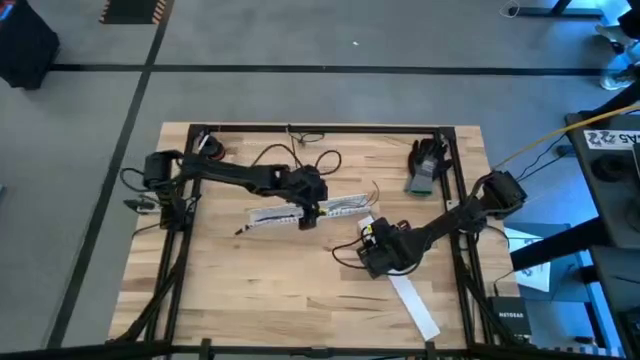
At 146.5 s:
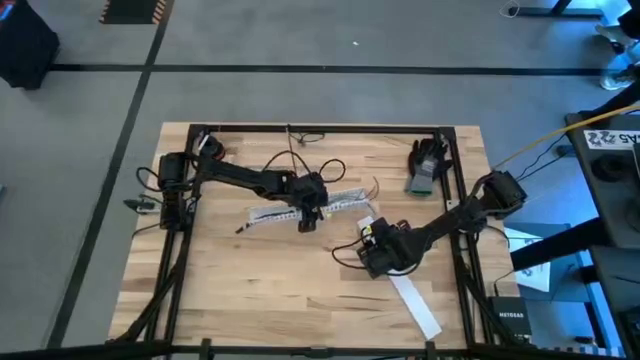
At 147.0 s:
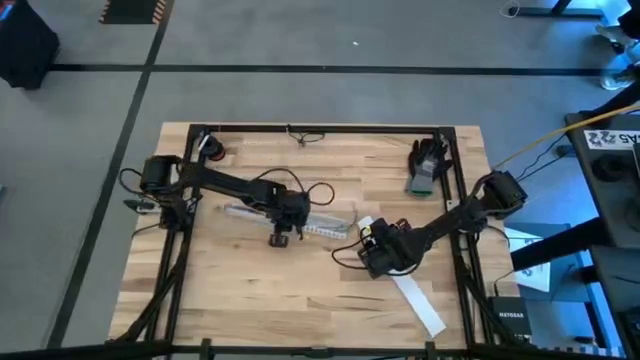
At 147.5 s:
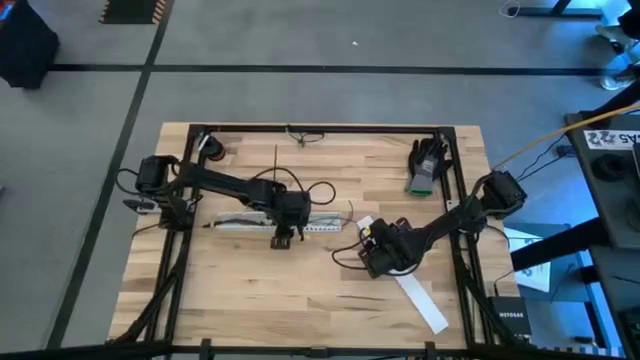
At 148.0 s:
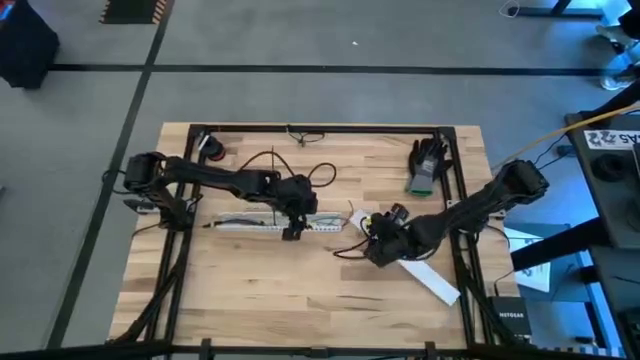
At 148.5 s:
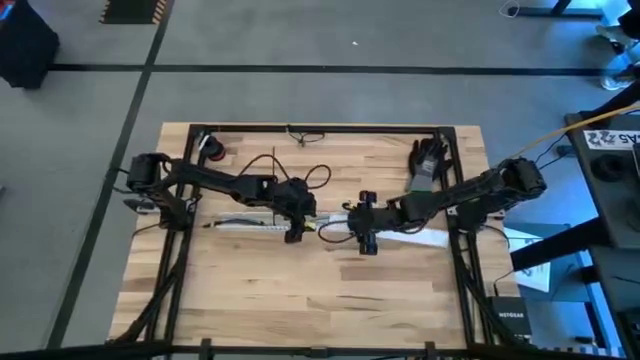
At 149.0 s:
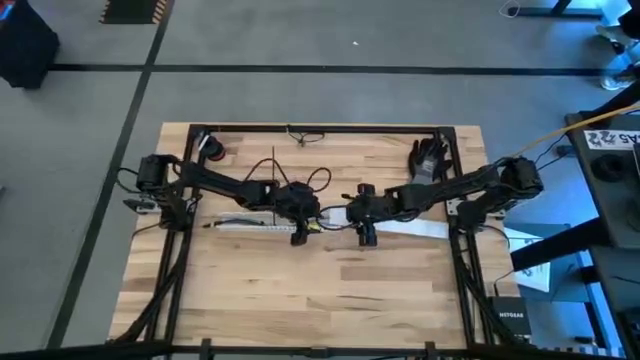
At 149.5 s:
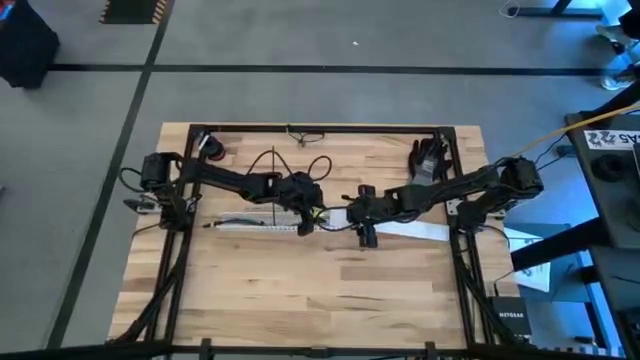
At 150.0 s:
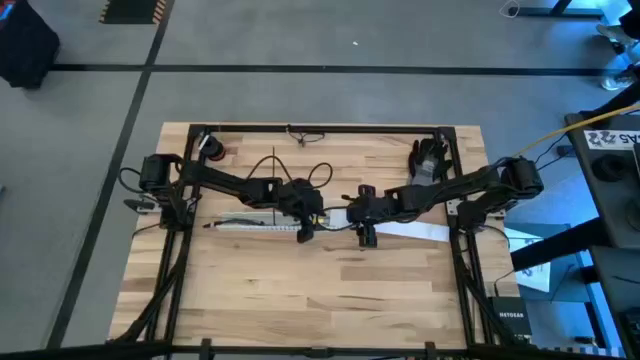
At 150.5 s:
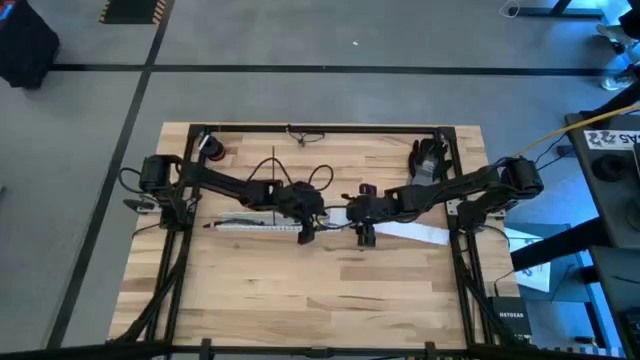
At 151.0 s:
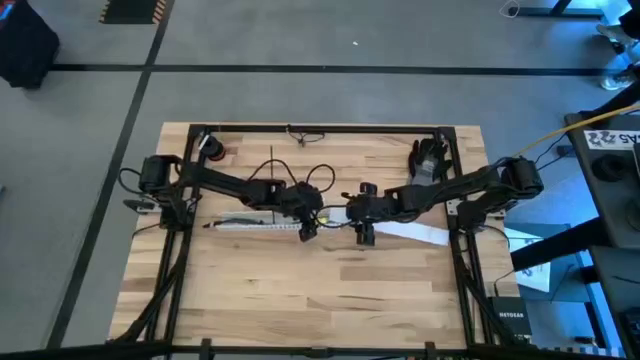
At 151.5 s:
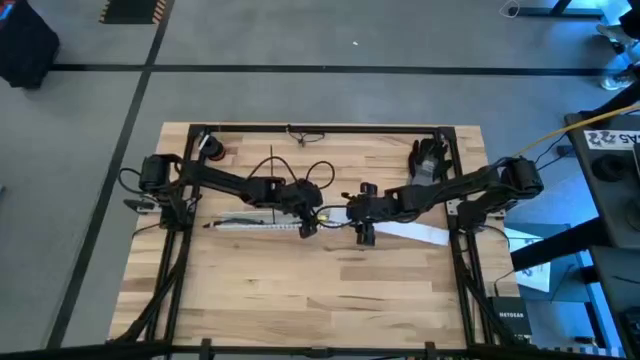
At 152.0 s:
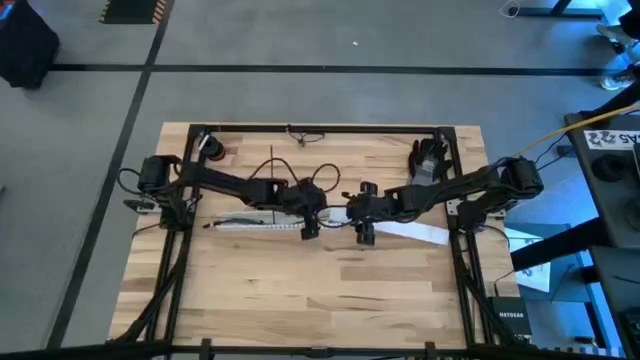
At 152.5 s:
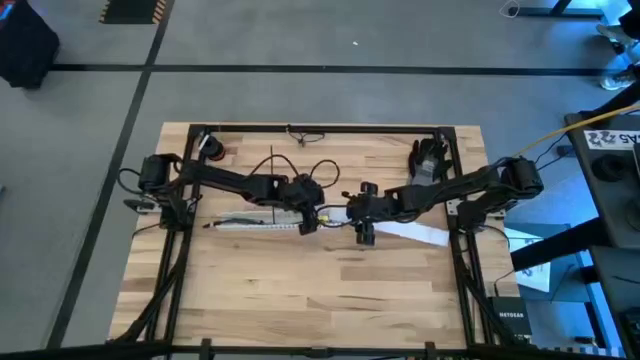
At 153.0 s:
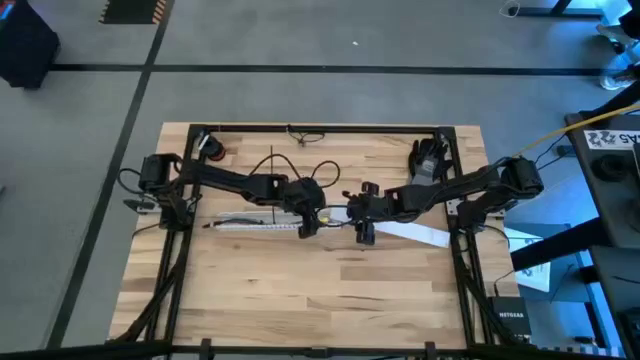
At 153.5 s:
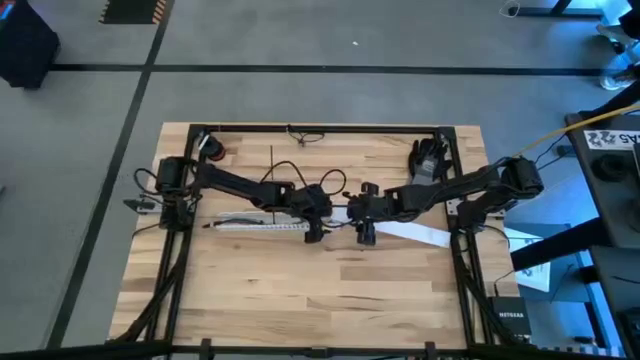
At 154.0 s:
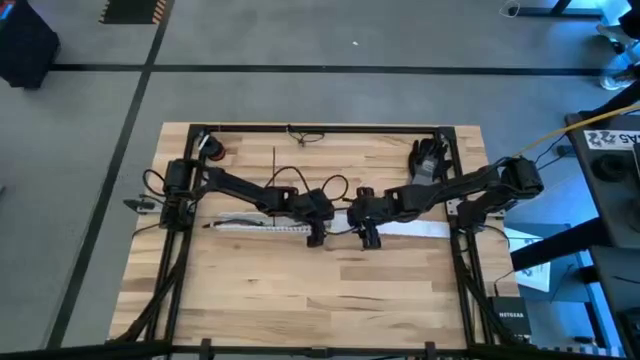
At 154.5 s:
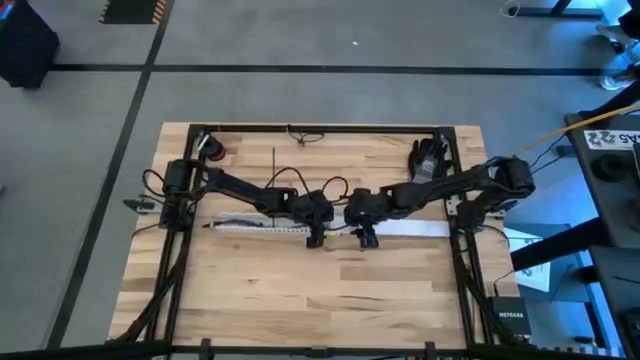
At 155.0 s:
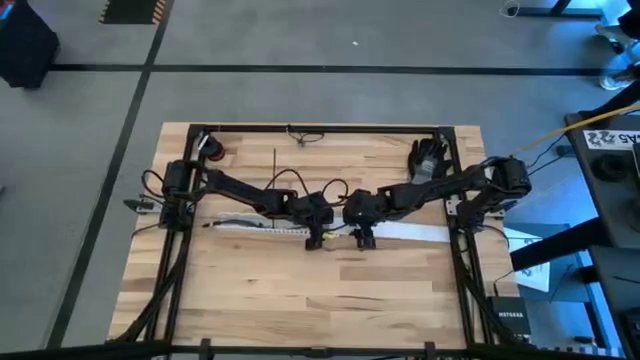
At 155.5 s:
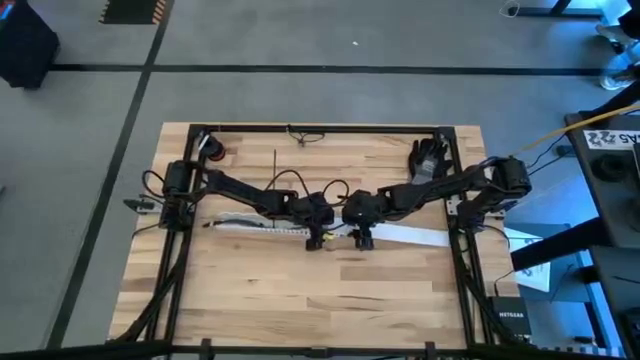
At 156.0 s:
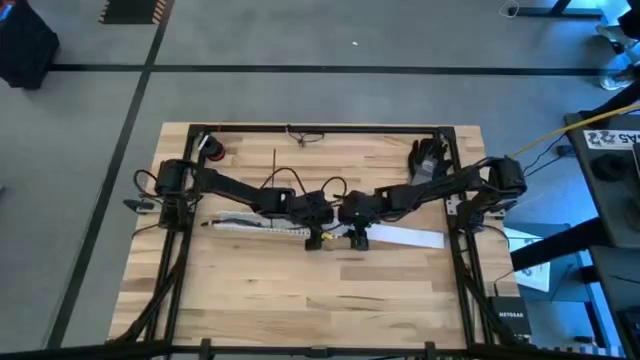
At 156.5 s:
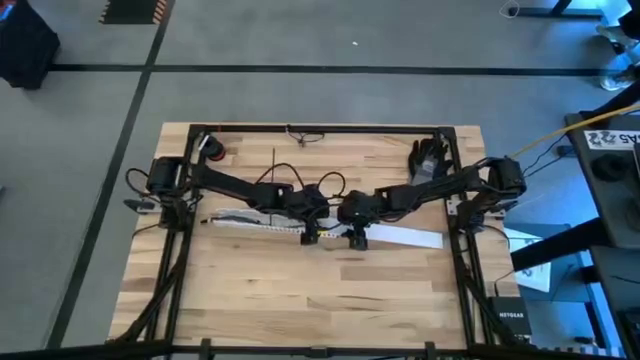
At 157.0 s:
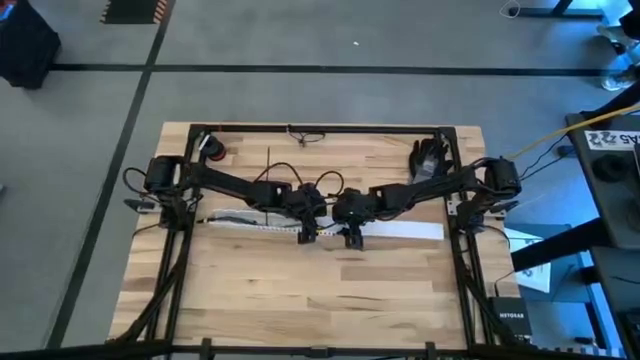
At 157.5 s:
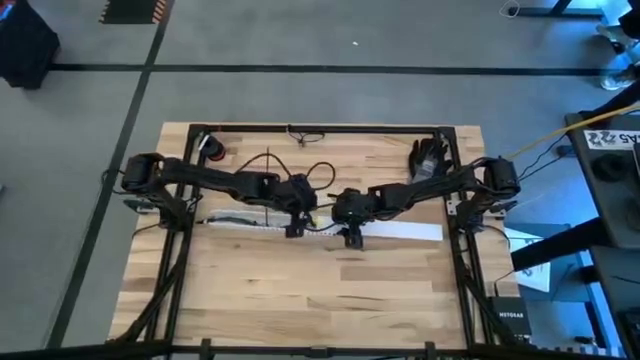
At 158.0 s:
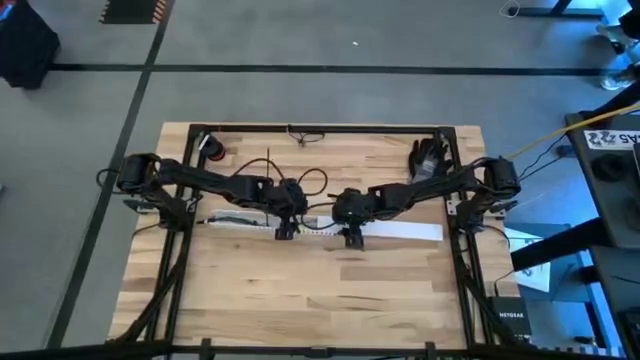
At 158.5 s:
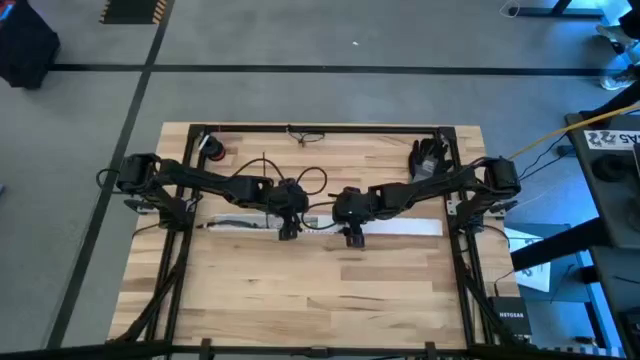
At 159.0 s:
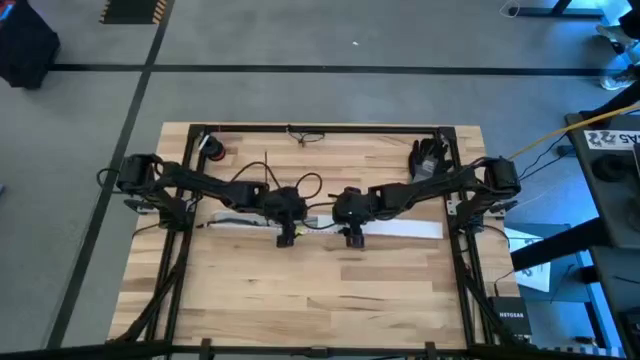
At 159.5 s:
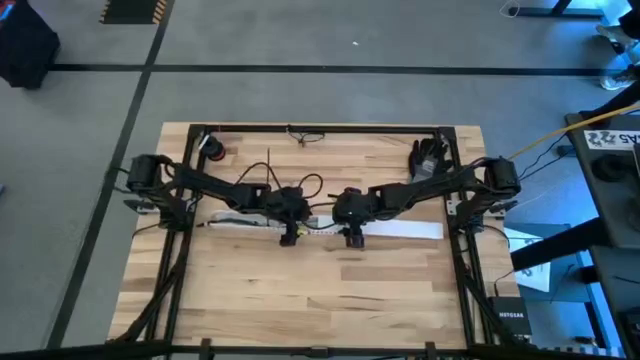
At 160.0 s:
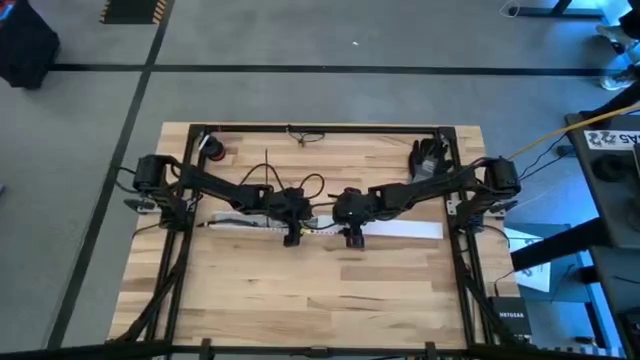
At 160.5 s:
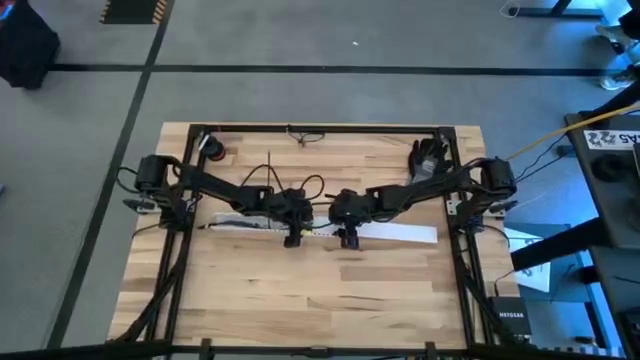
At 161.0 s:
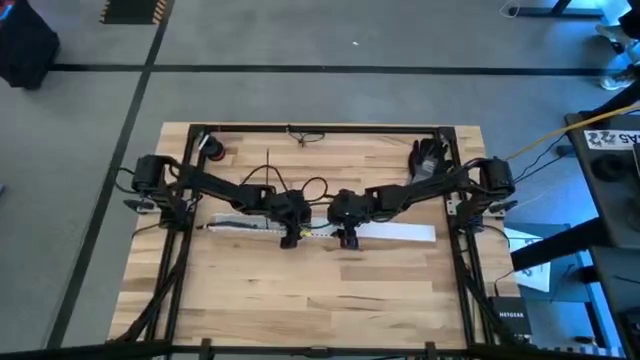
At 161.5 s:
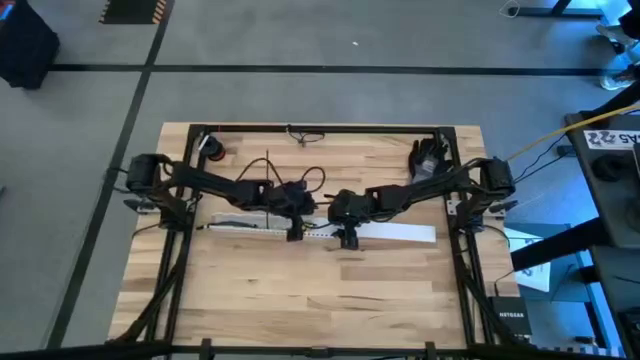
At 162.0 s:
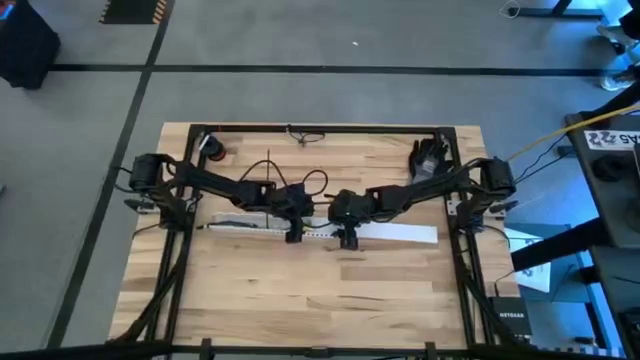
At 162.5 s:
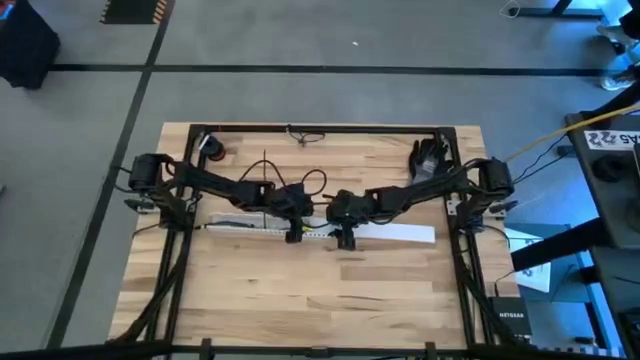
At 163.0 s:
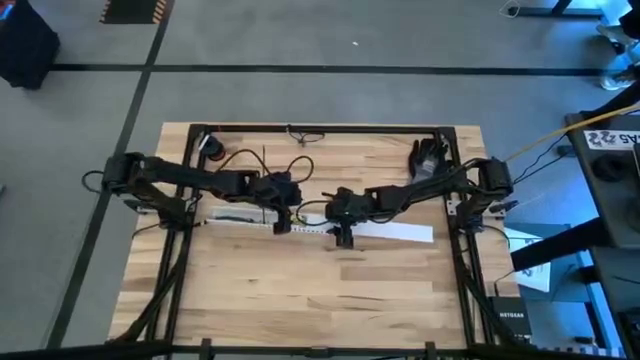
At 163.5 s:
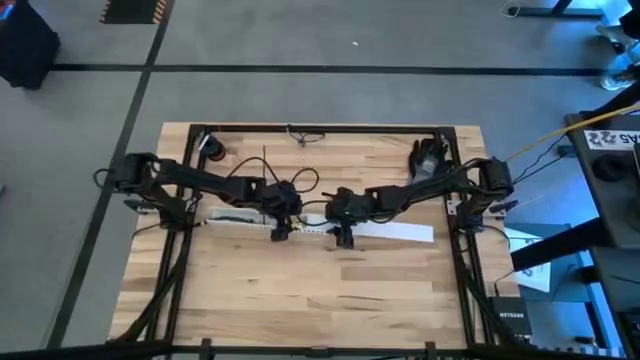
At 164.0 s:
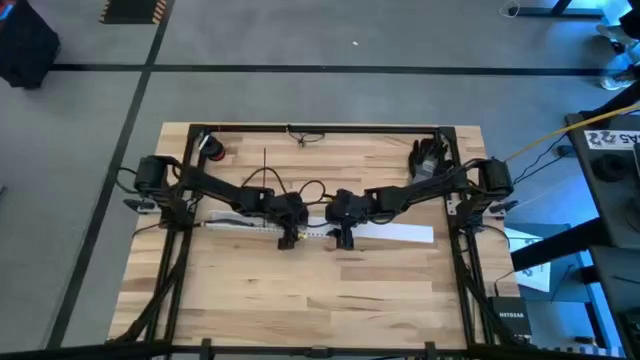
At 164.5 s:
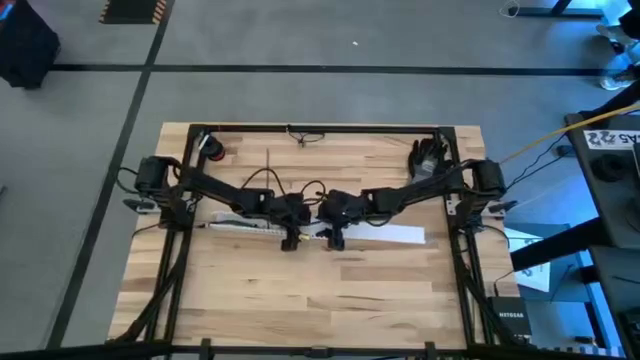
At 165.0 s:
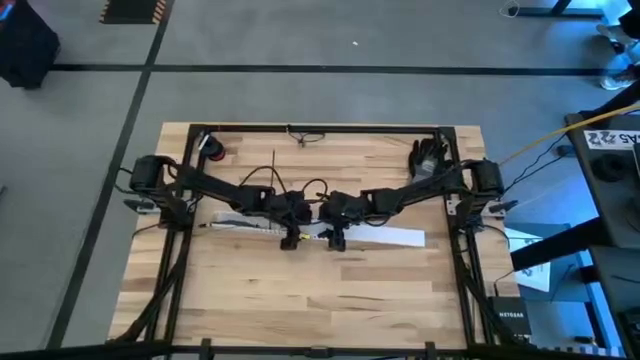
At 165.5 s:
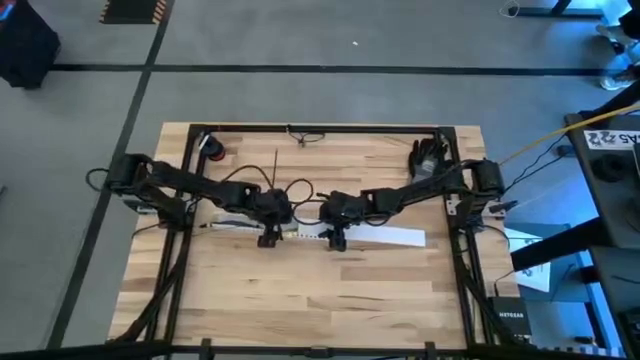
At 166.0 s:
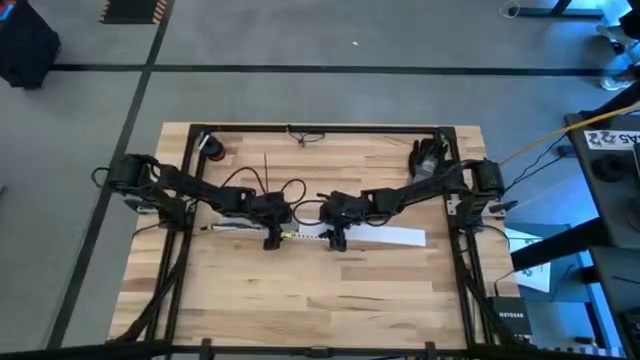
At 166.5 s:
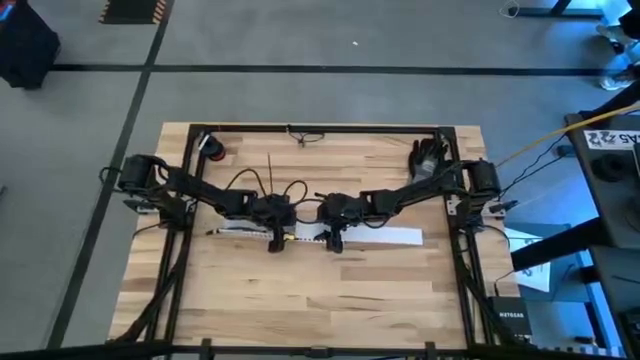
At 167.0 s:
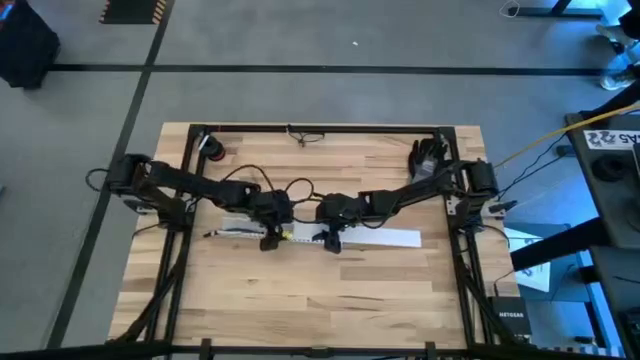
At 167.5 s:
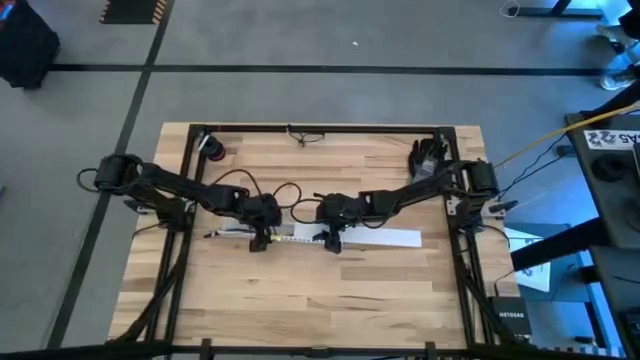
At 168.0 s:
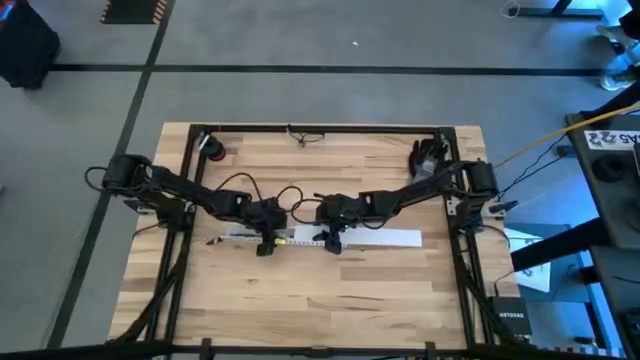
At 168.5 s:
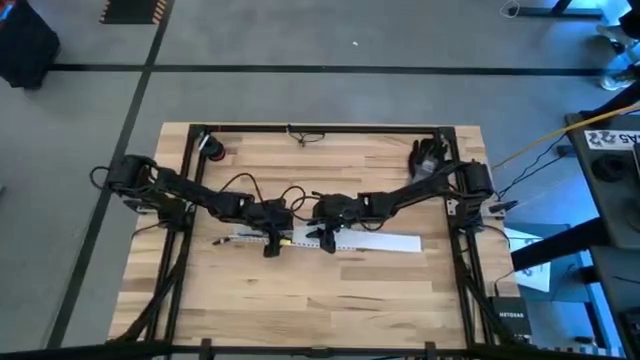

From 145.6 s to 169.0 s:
Task: Ziptie cables
Close the cable duct
